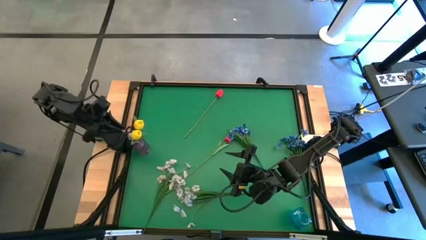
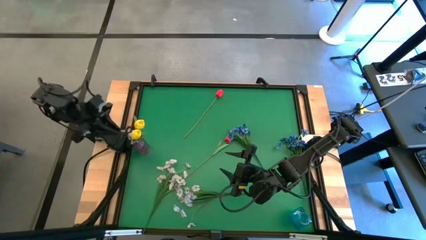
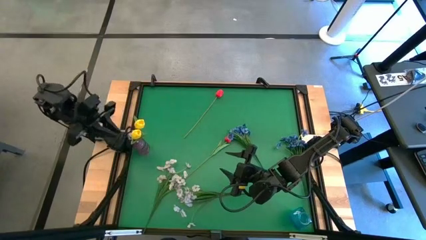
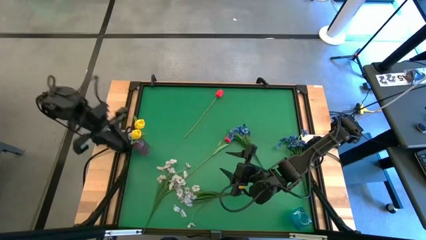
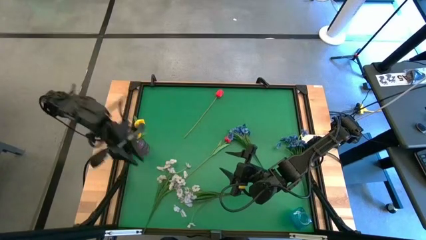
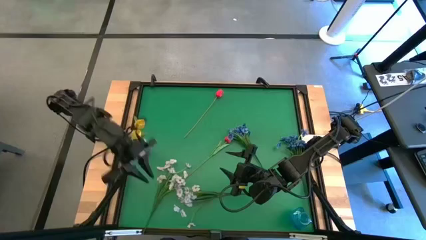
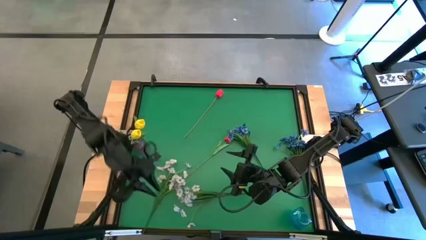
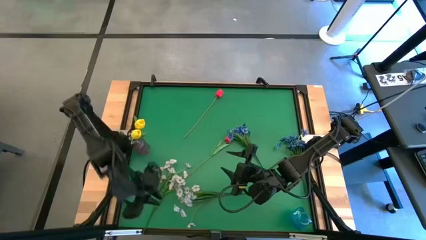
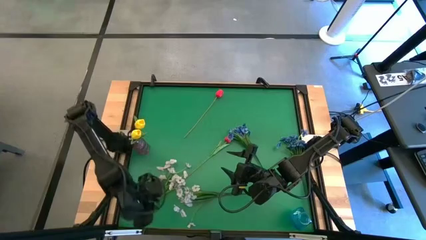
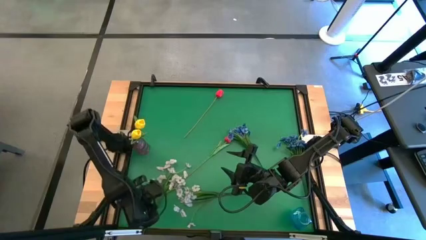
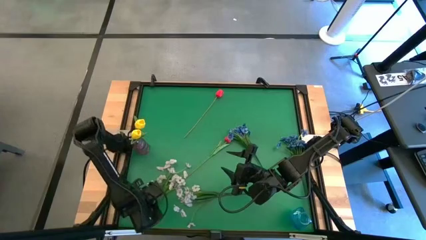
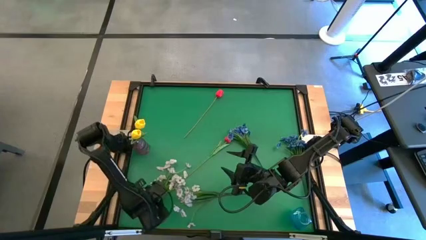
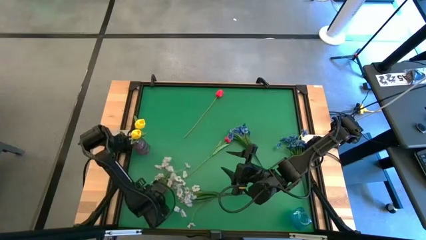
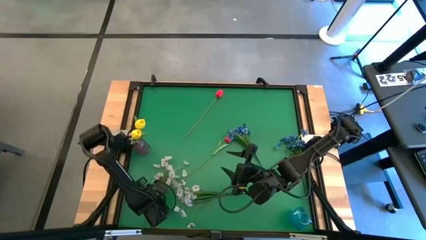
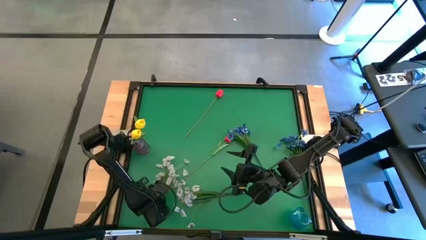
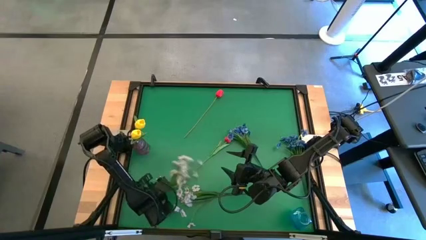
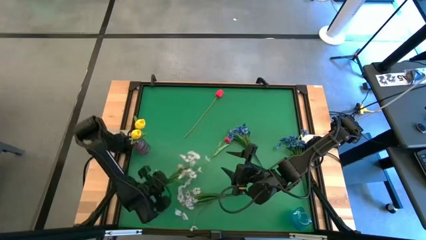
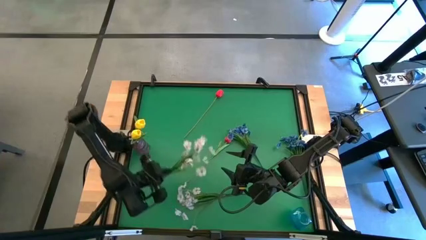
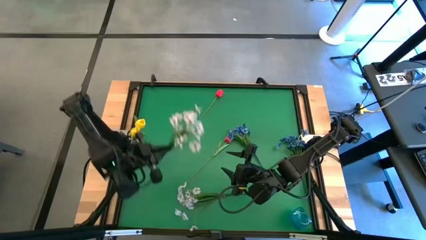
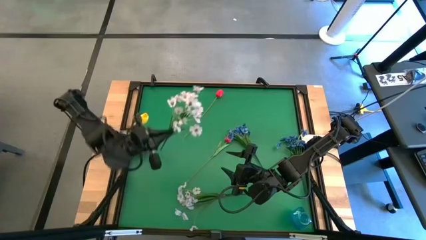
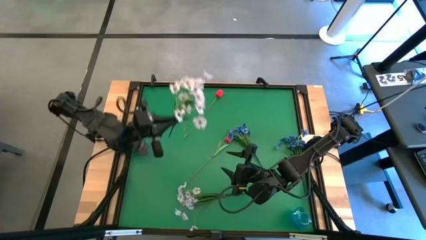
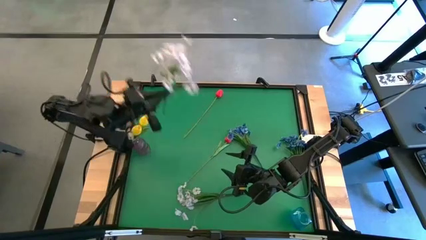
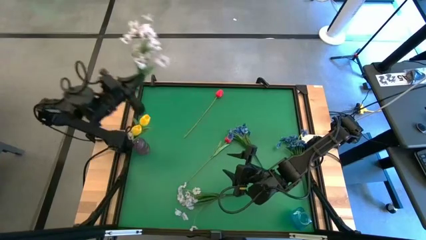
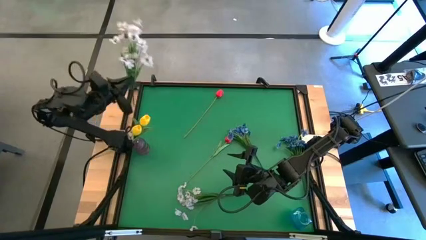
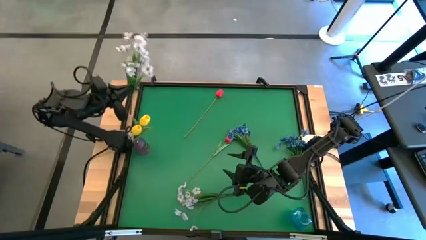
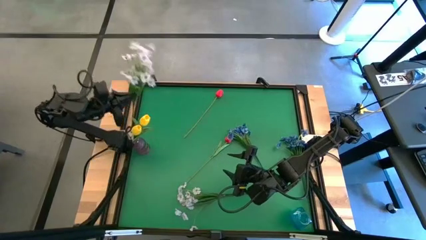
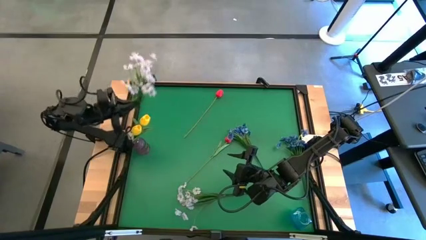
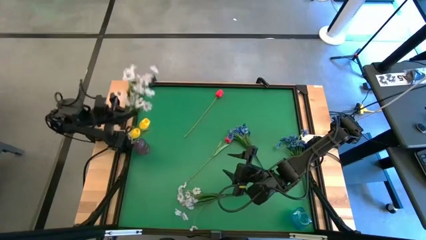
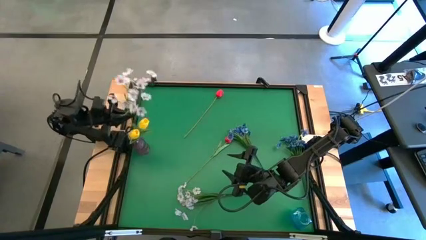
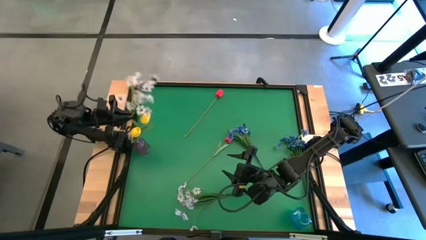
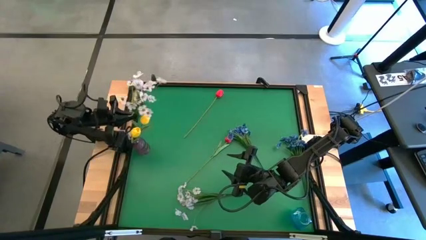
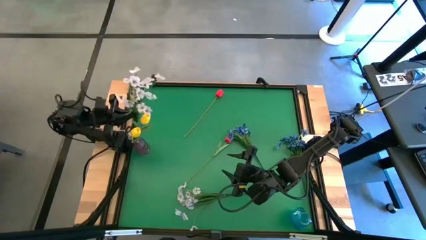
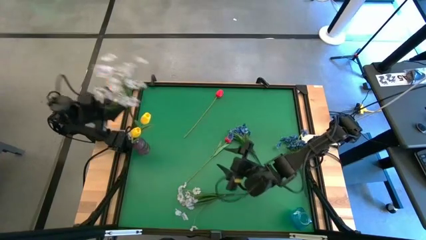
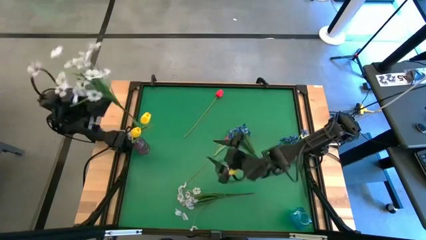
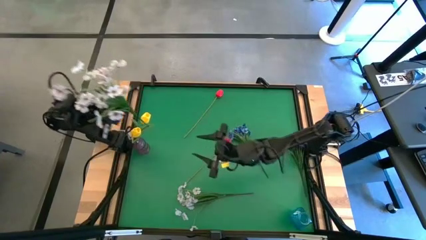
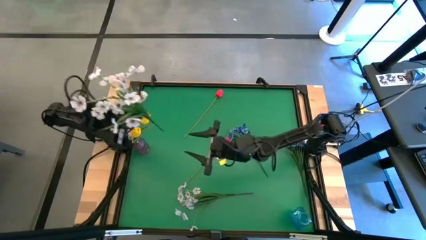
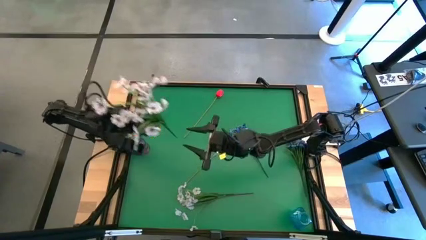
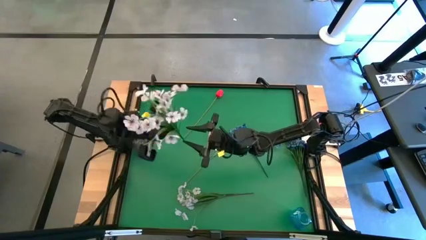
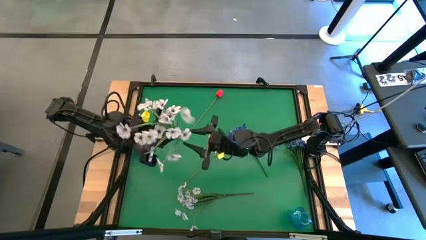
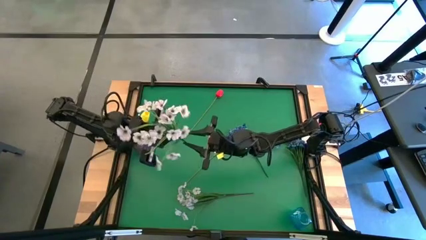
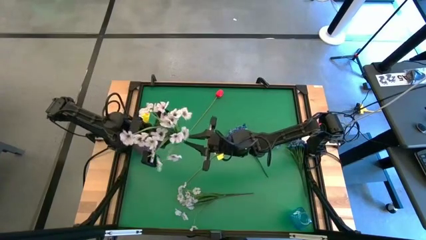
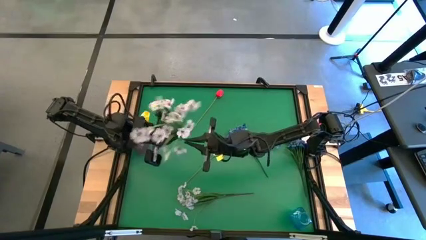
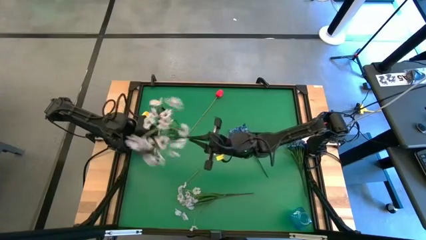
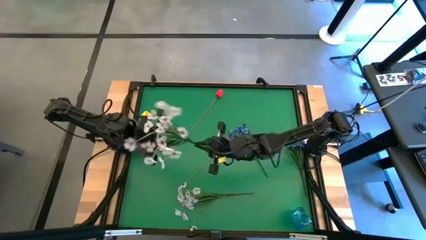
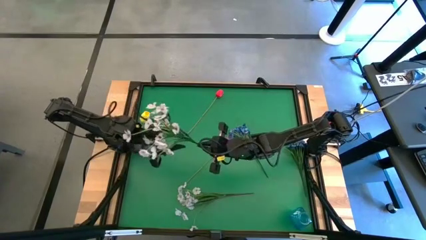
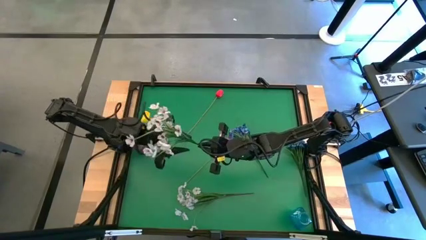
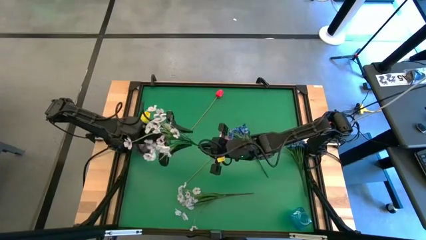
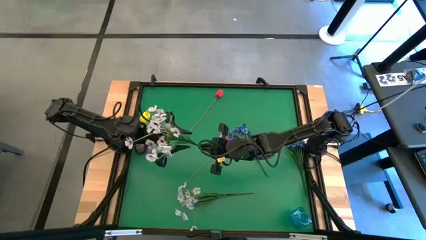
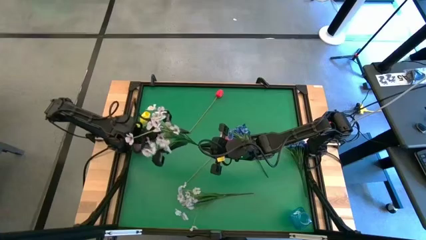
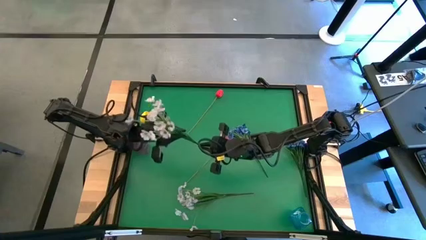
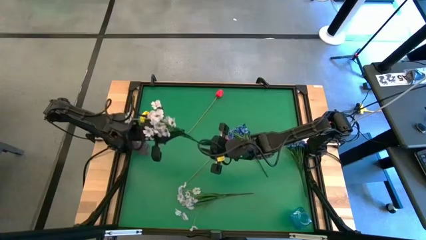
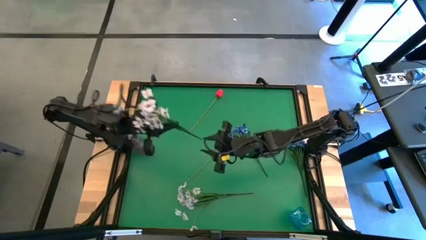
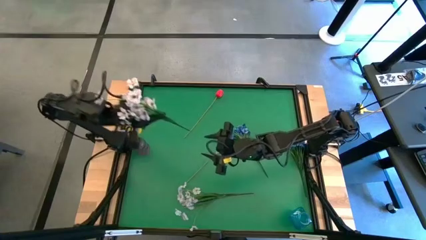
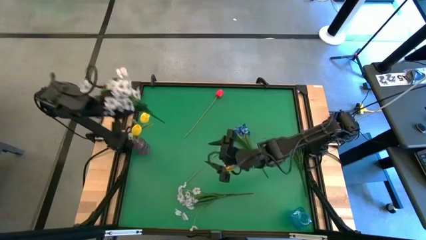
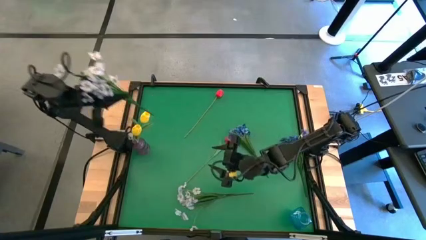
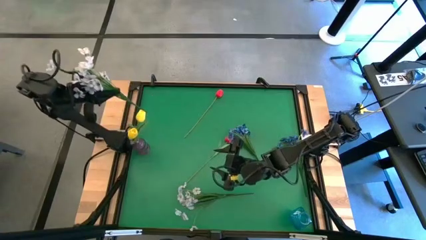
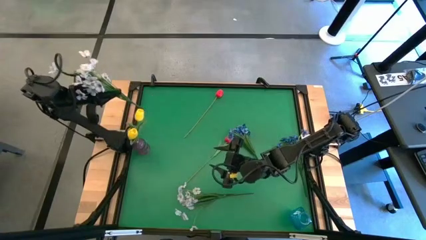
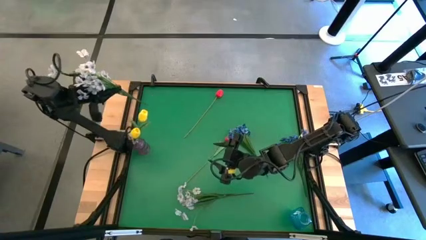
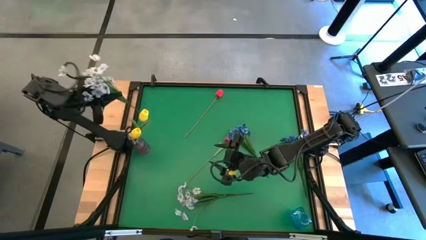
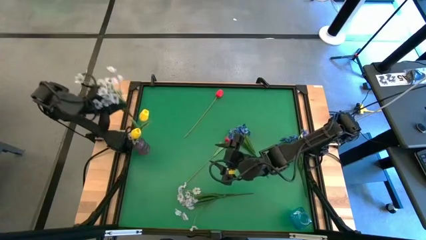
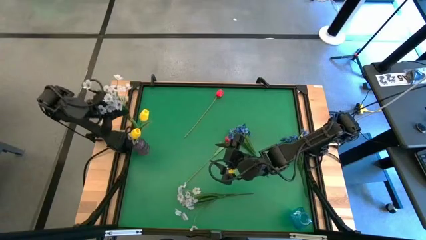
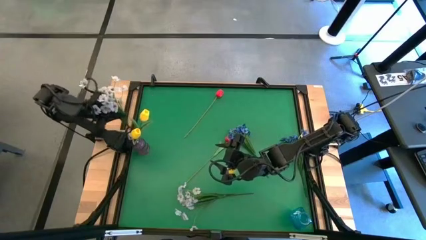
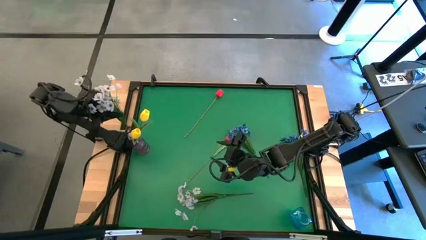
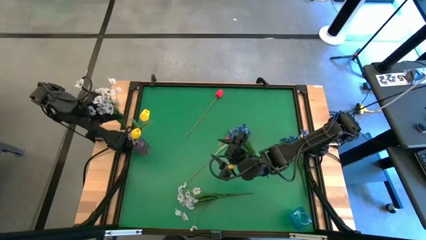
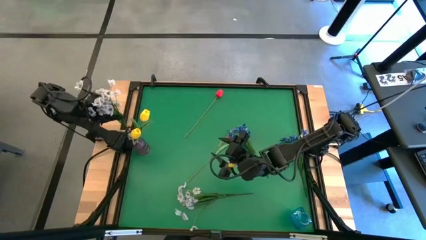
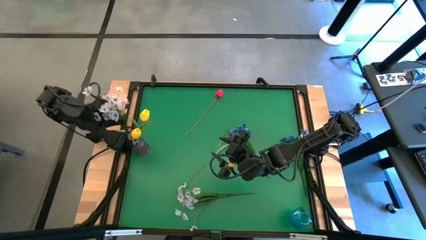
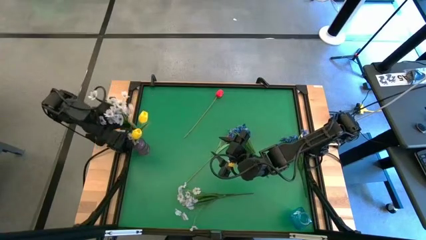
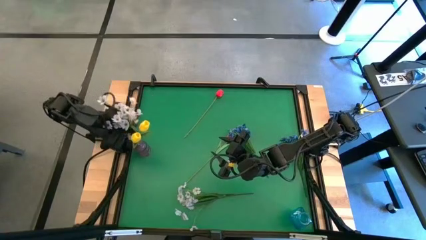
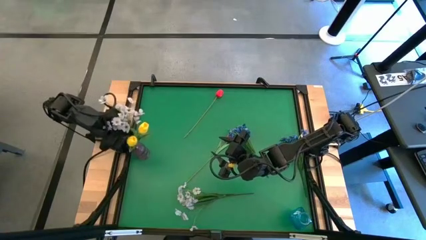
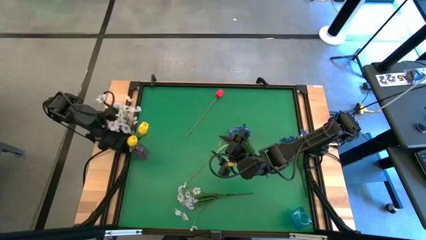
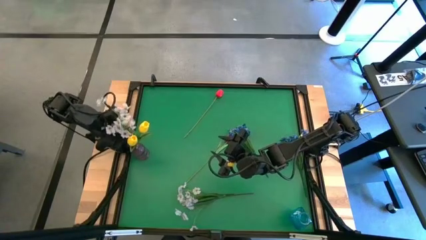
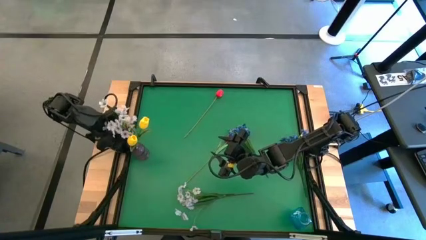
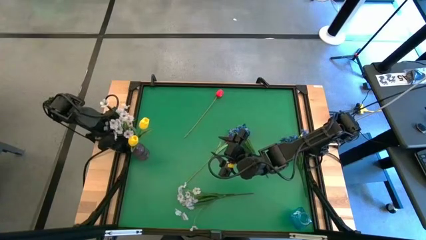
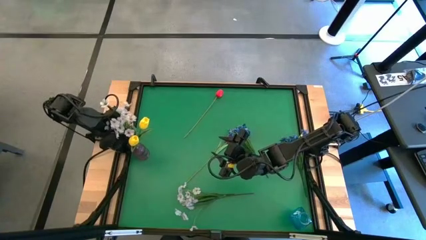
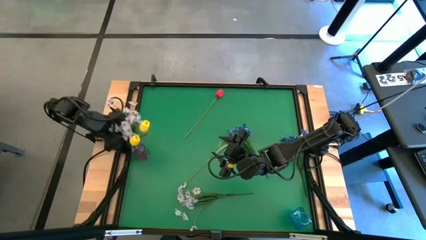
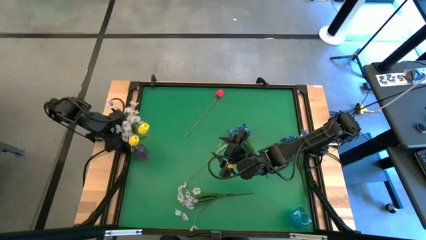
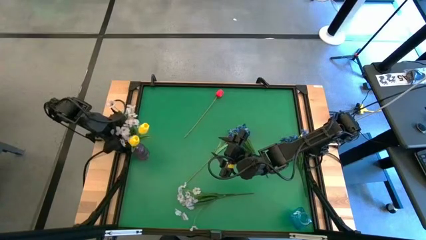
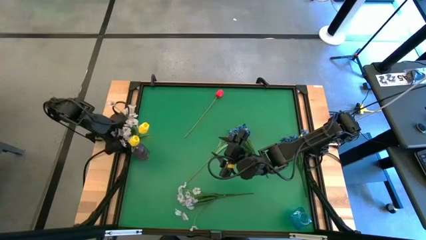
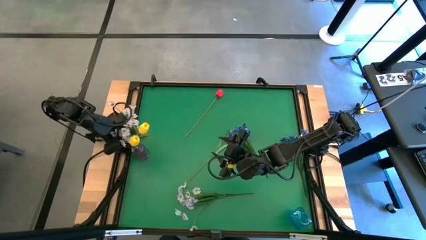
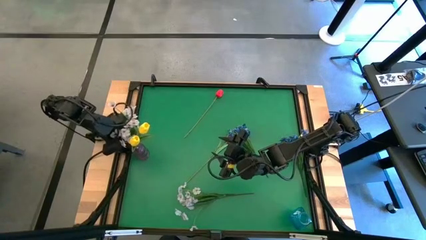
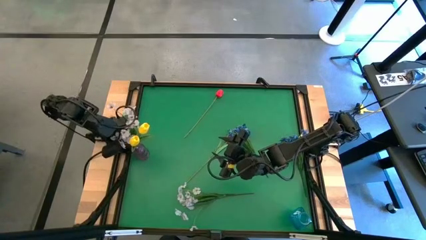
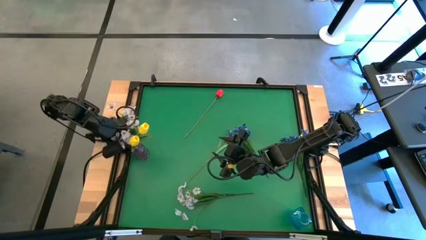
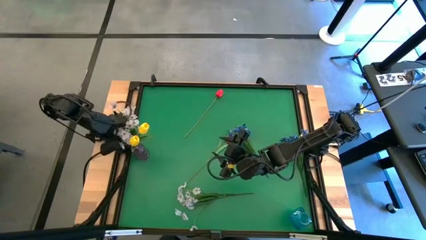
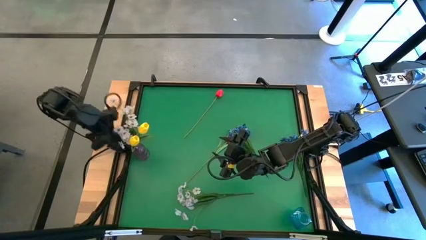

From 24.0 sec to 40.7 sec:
Task: Sort flowers into vase by color
Put the left white flower into the purple vase
